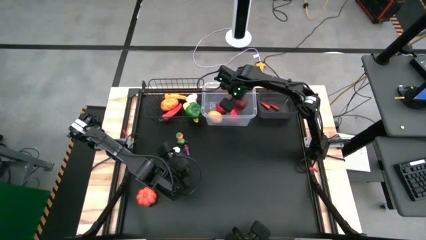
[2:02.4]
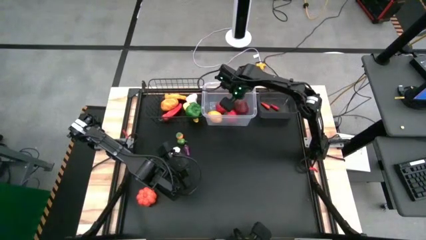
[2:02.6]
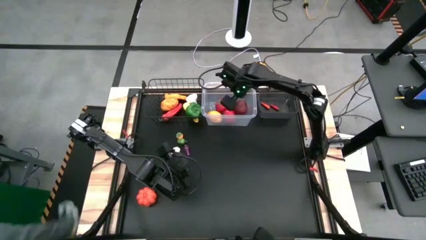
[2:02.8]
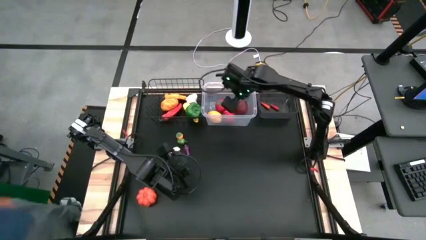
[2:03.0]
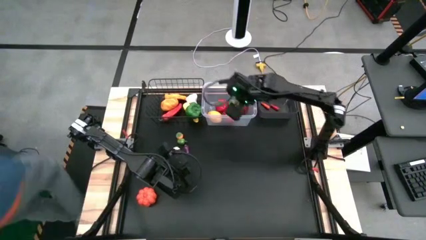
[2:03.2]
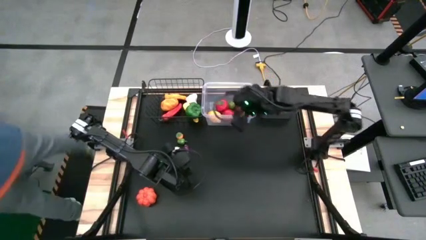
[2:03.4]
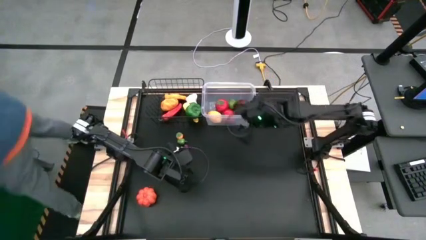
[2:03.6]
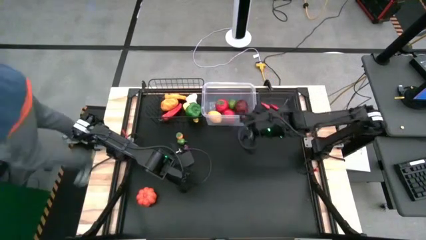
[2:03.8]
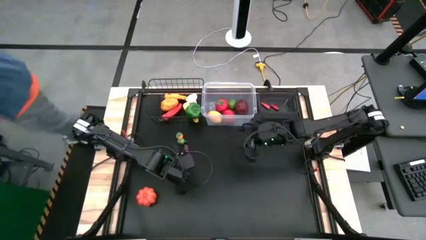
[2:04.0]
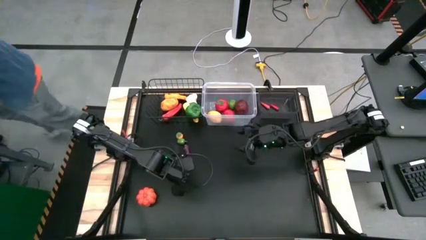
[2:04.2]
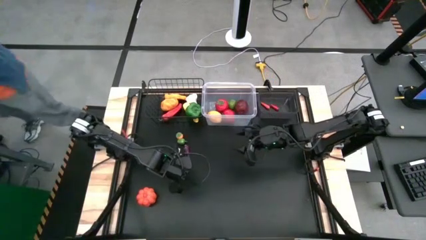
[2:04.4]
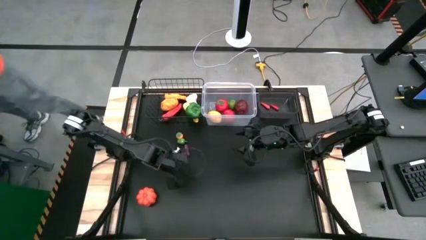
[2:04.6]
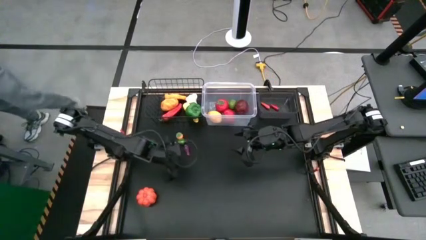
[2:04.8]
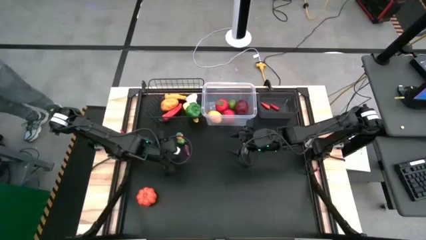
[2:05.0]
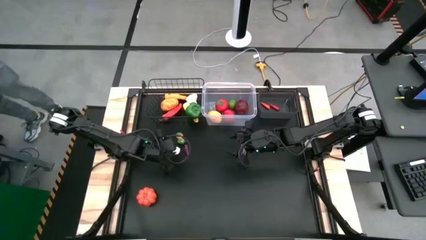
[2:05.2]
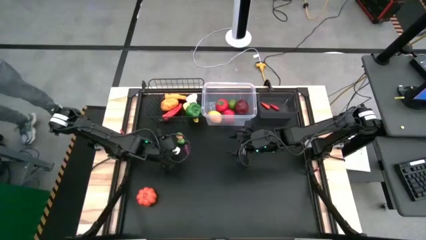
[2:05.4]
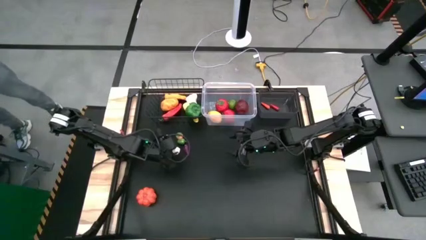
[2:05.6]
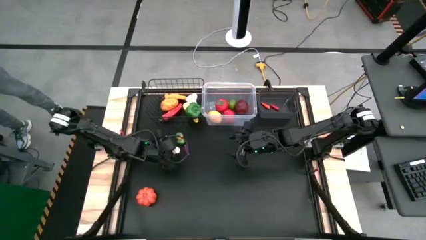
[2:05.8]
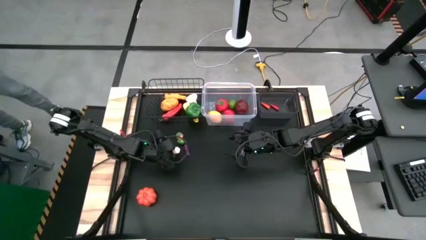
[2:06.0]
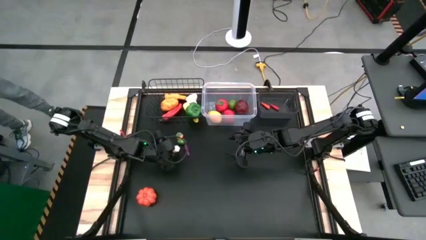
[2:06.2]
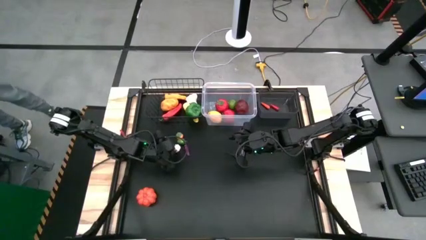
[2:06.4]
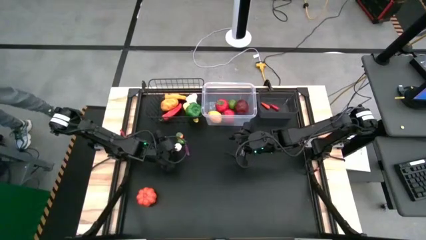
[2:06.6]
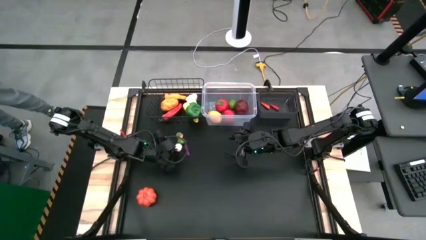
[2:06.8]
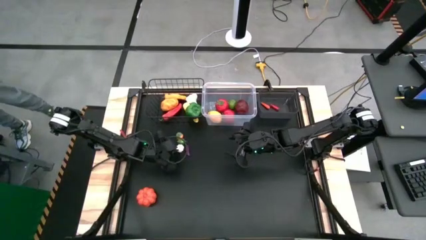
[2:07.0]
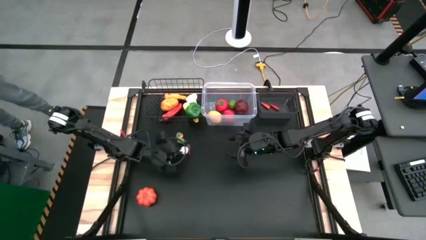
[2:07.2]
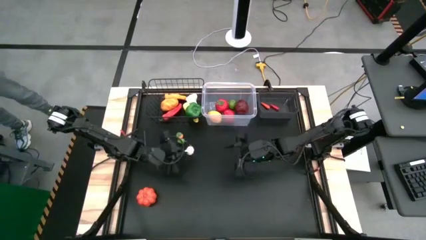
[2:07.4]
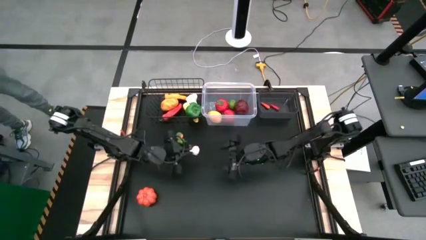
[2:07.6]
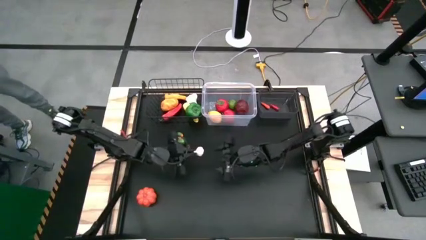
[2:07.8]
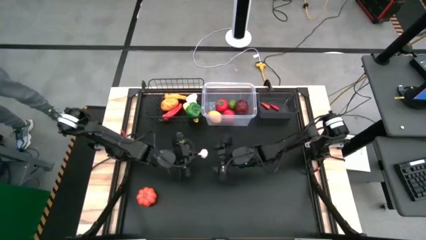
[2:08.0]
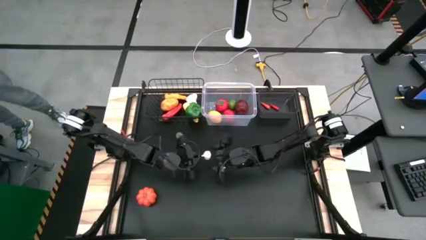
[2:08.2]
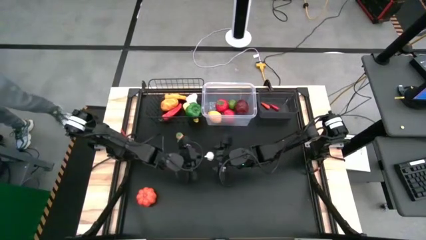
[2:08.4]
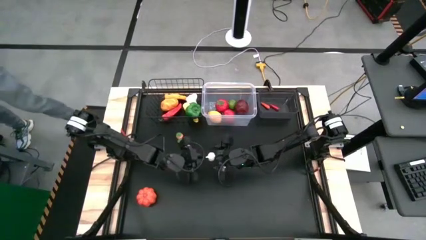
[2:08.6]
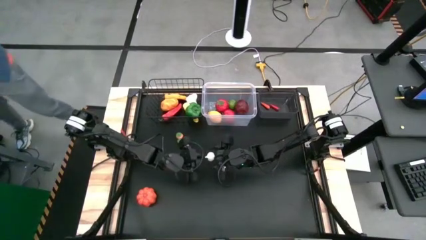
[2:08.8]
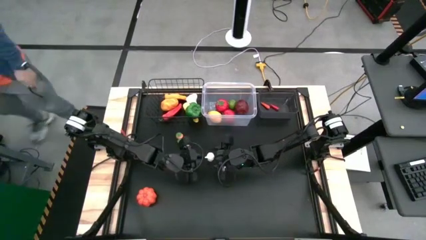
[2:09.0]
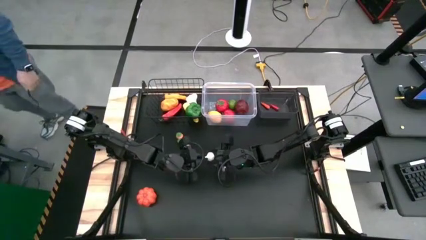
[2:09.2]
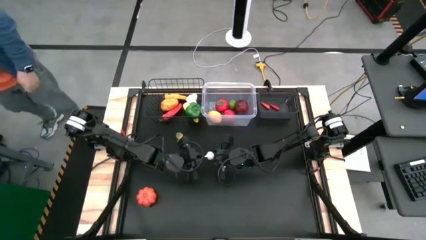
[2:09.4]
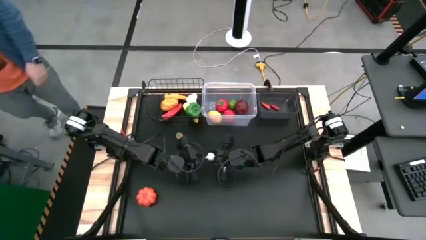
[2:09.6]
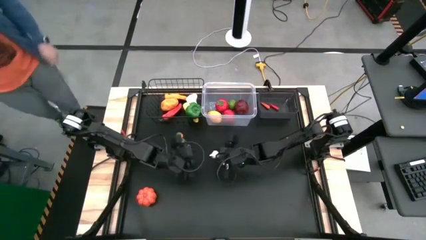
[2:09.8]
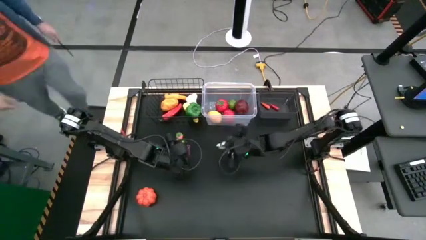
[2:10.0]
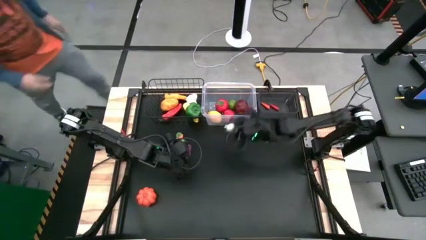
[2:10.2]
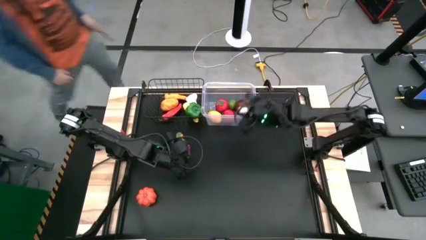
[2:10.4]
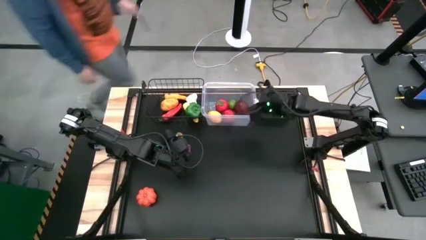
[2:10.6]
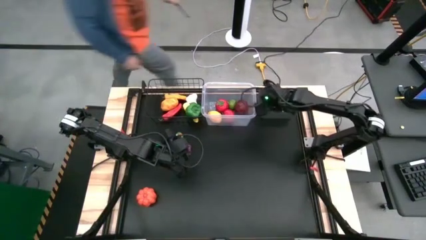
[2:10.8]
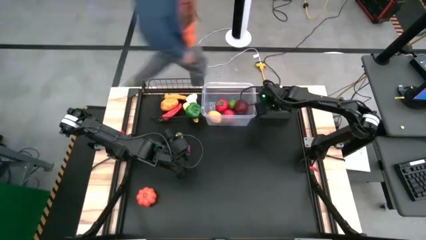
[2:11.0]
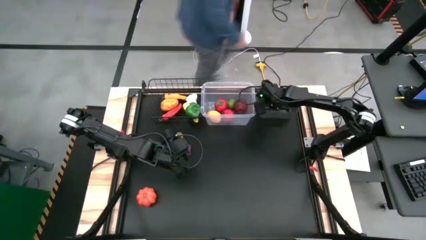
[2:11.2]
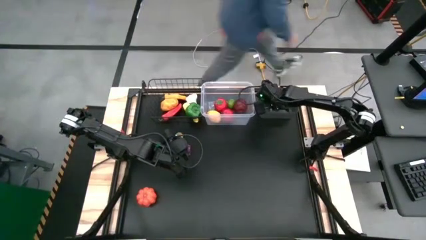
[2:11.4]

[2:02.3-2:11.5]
Task: Sort produce into baskets
Put the garlic into the black bin

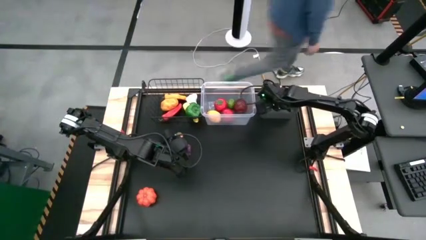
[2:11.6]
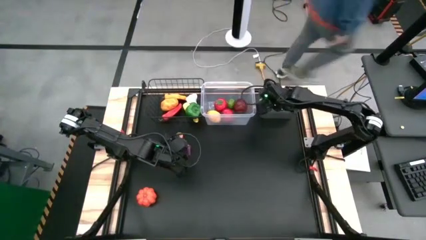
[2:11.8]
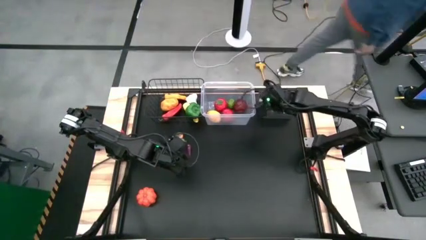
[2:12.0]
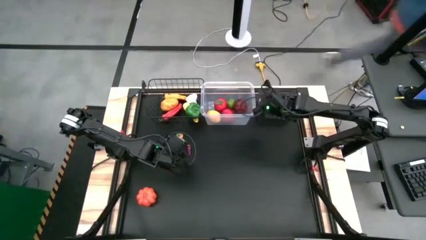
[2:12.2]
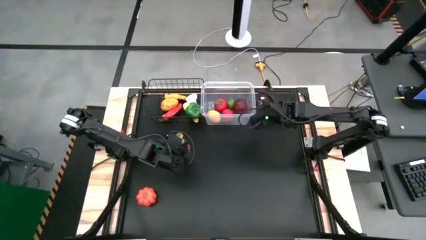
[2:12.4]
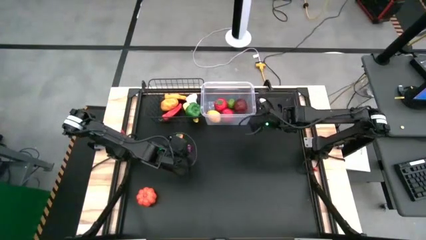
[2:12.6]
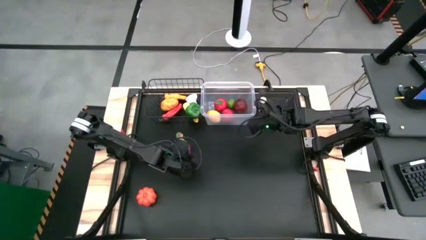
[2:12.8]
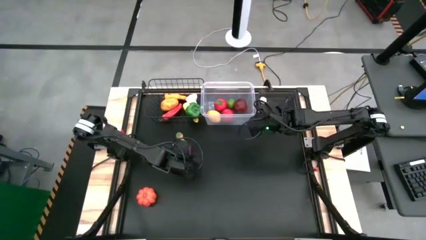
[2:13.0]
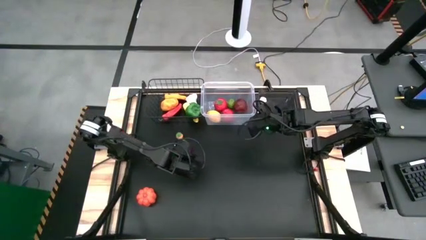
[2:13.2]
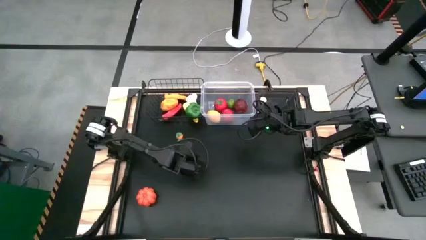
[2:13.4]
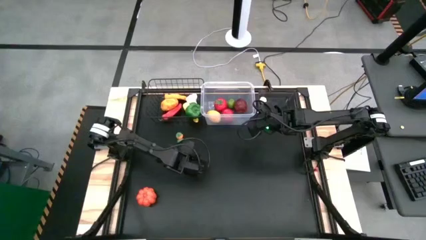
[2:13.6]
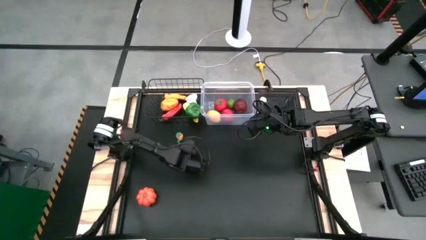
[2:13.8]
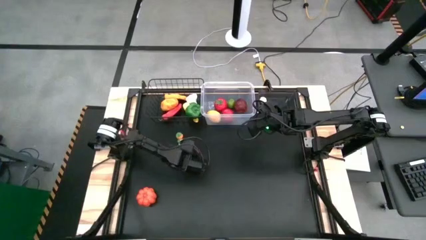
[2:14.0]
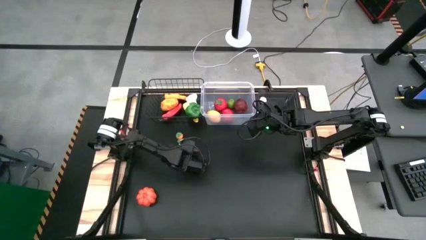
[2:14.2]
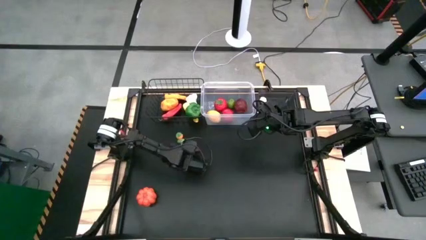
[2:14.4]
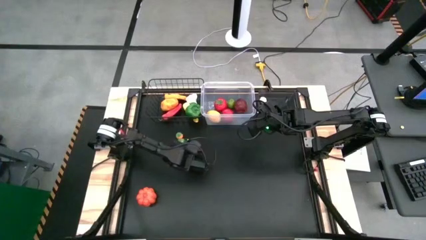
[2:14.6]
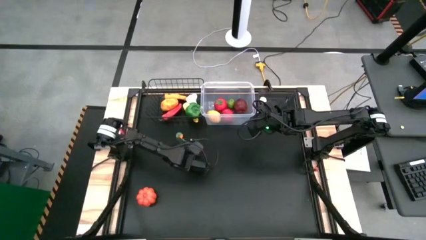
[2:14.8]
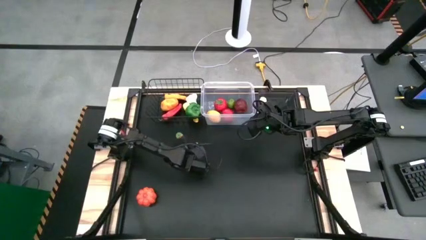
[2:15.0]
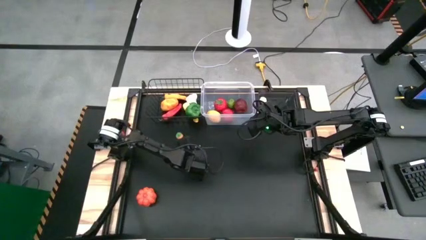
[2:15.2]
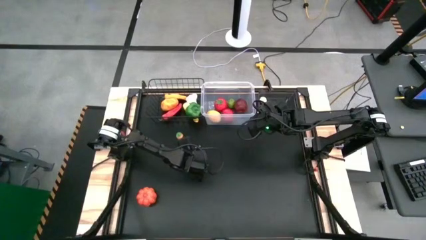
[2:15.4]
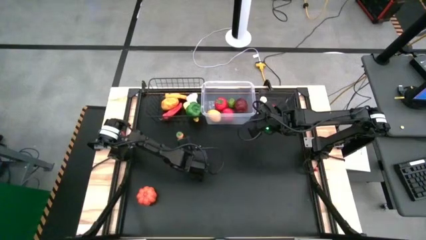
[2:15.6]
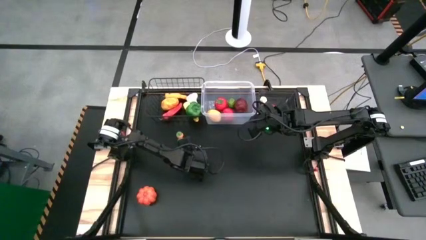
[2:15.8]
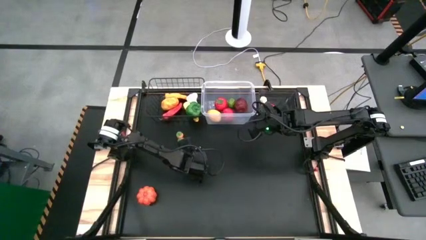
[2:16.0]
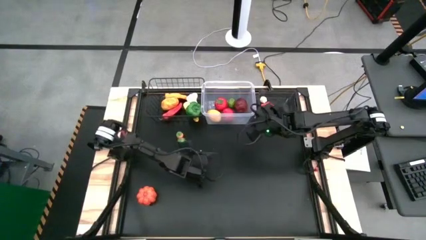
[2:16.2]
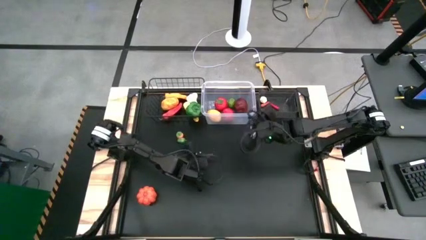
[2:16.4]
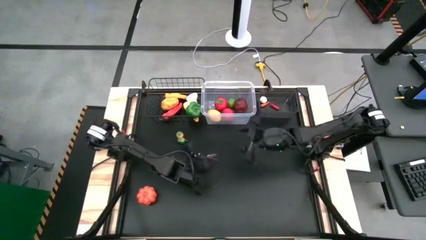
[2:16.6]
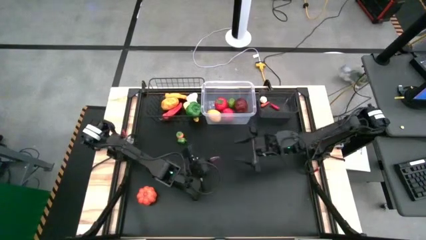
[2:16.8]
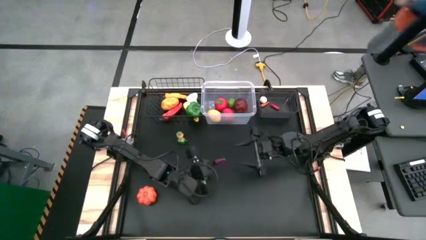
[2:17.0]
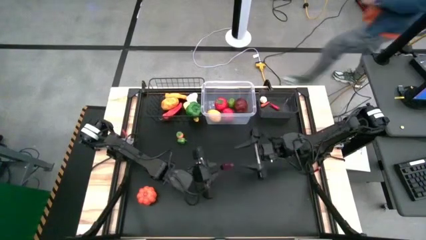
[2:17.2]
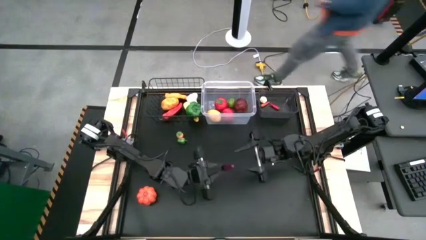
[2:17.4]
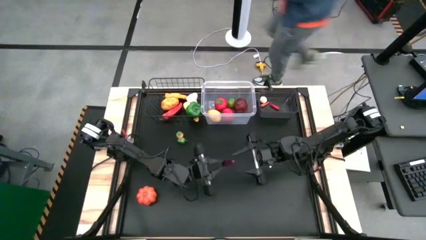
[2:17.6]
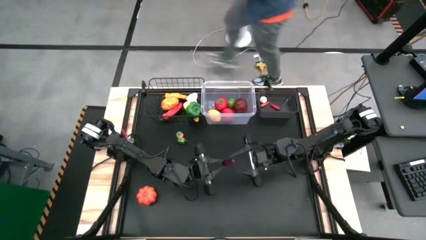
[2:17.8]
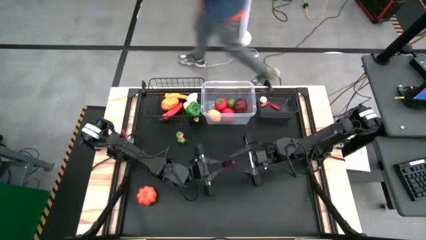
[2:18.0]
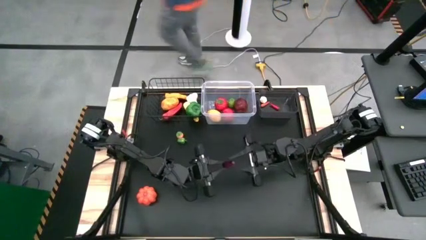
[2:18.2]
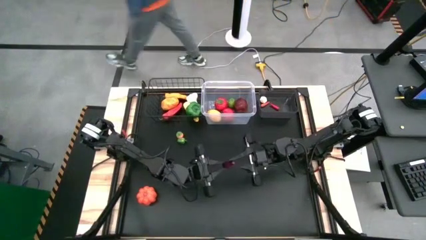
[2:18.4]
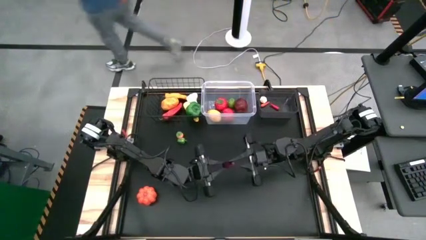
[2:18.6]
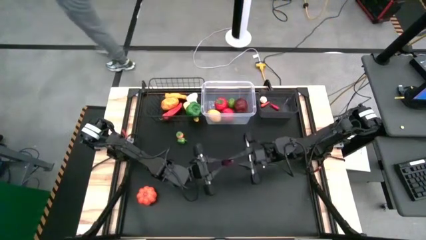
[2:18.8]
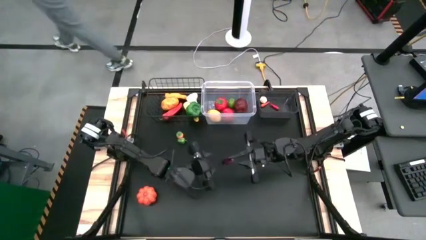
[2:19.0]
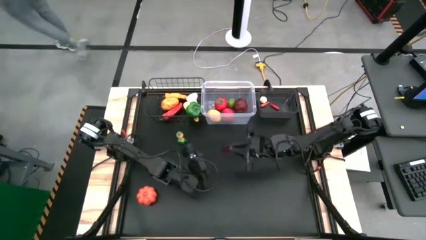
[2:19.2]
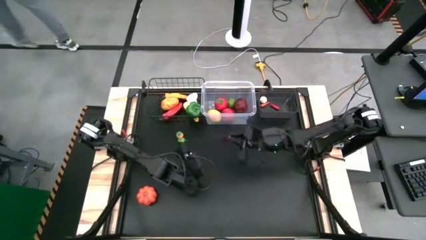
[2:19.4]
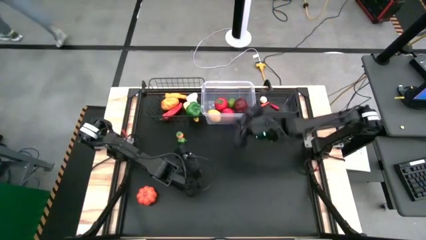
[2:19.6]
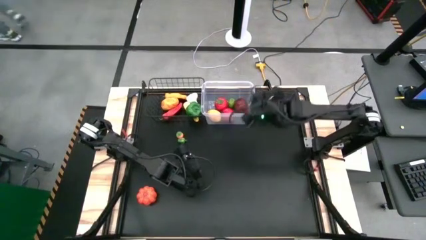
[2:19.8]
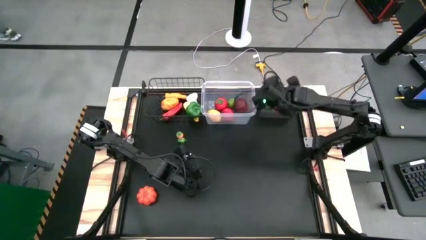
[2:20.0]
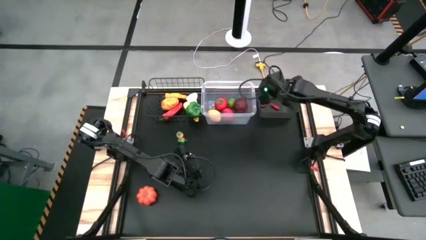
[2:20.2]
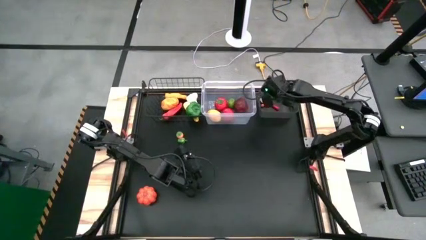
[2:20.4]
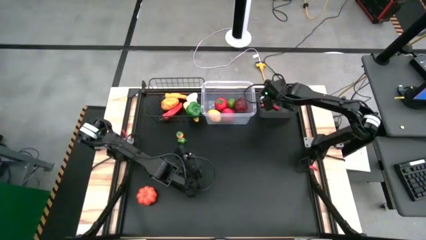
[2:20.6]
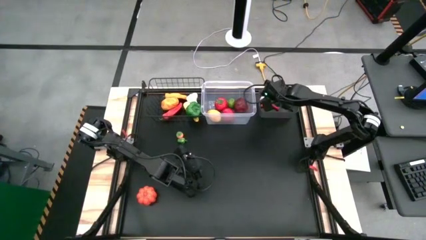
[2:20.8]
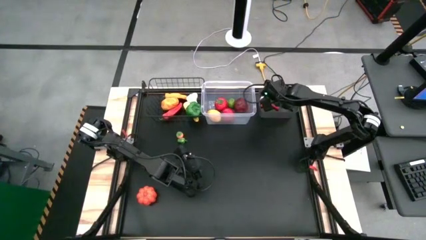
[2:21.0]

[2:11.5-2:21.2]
Put the eggplant into the black bin
